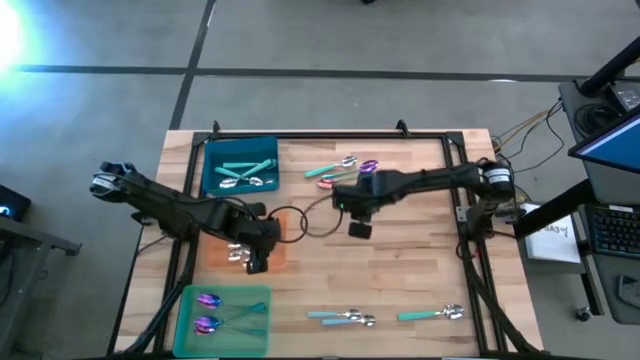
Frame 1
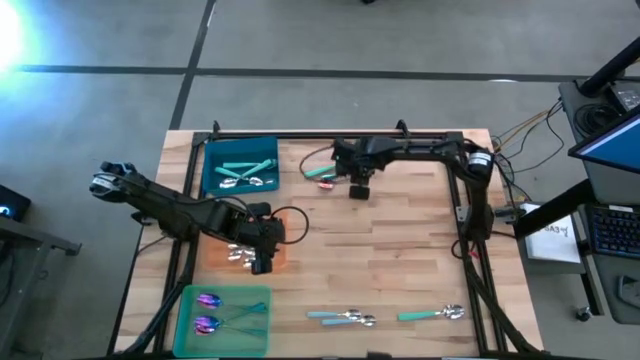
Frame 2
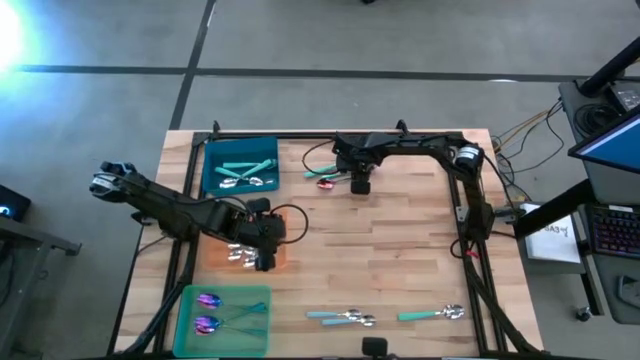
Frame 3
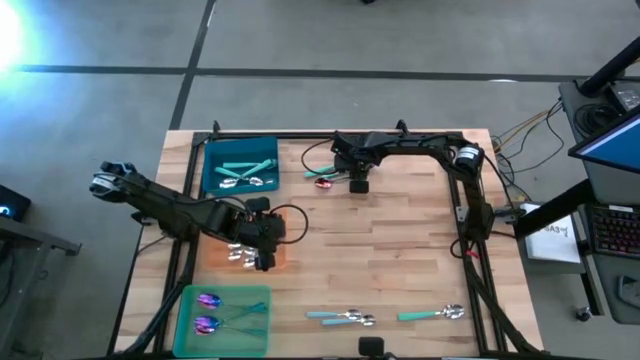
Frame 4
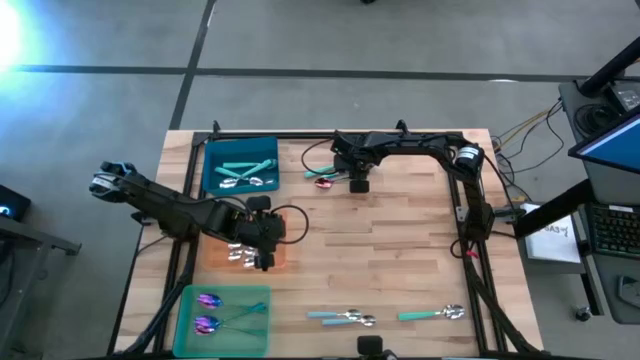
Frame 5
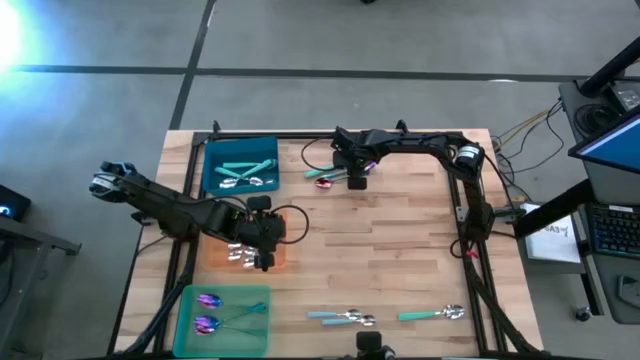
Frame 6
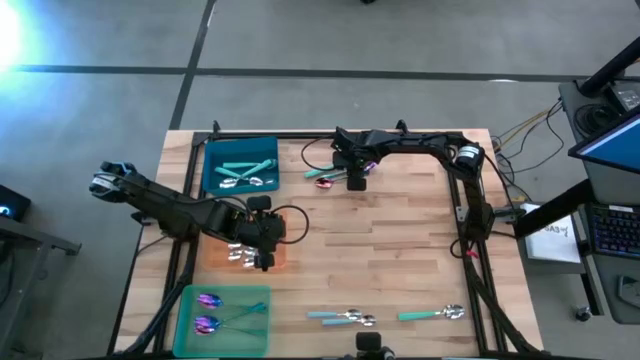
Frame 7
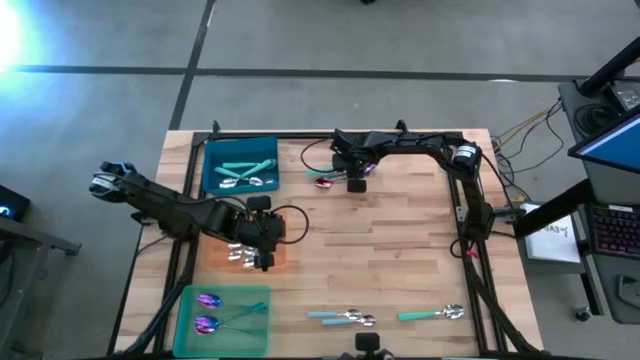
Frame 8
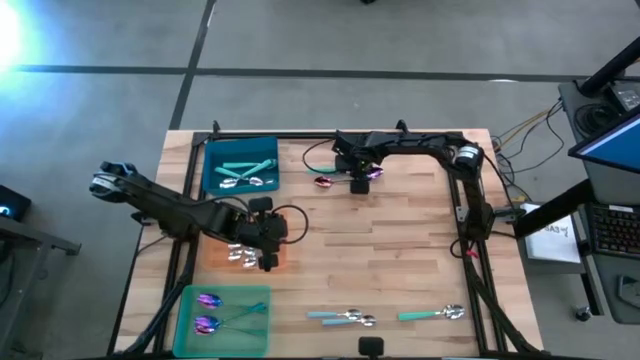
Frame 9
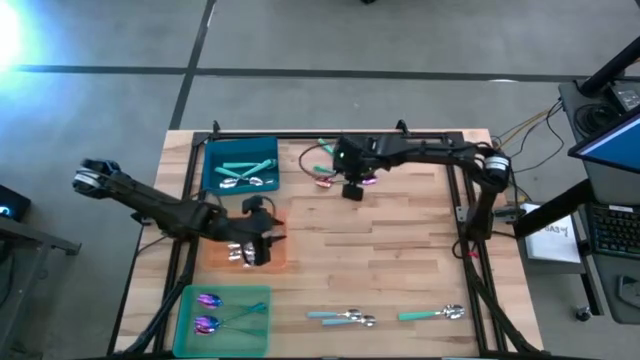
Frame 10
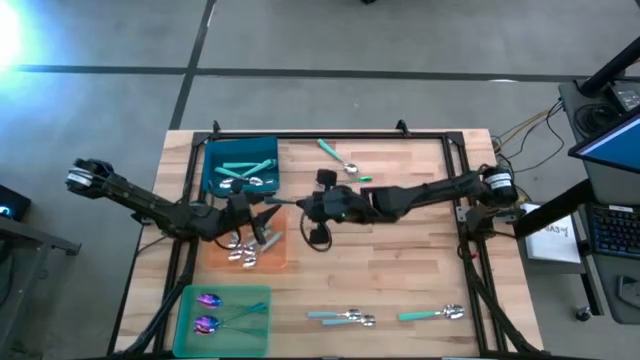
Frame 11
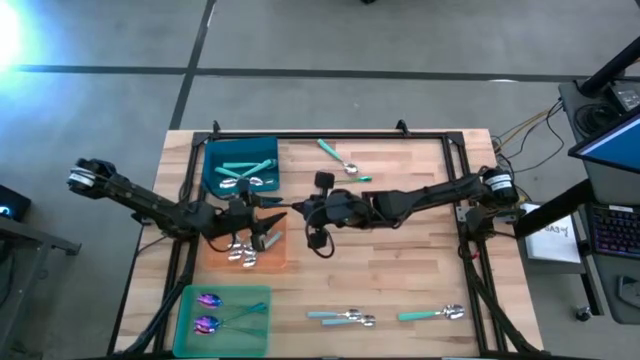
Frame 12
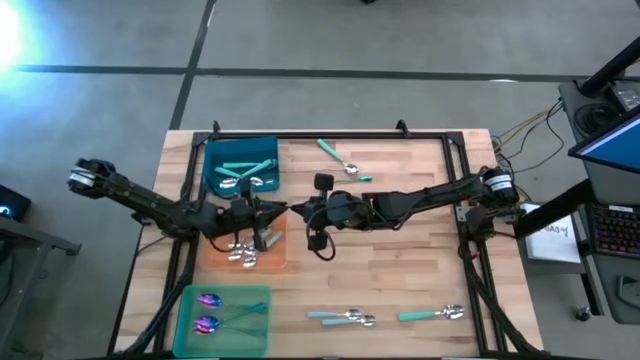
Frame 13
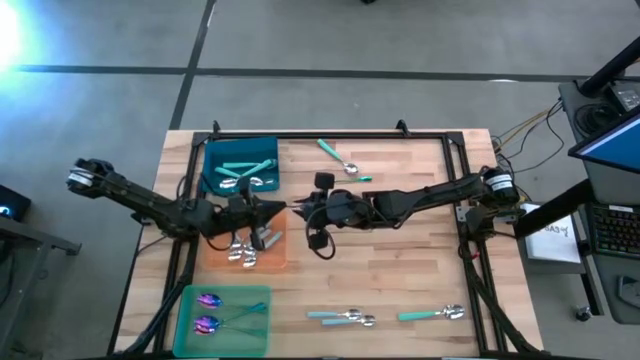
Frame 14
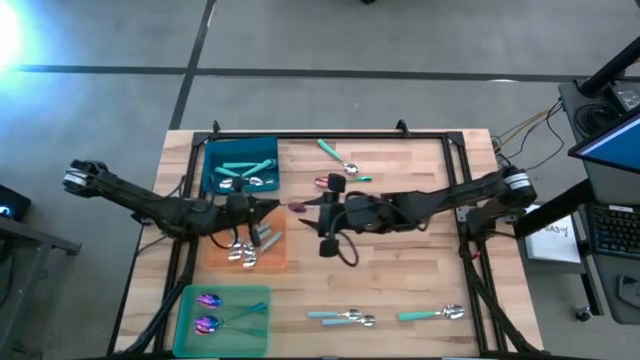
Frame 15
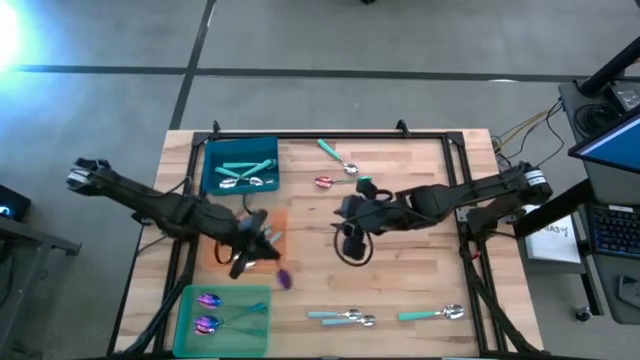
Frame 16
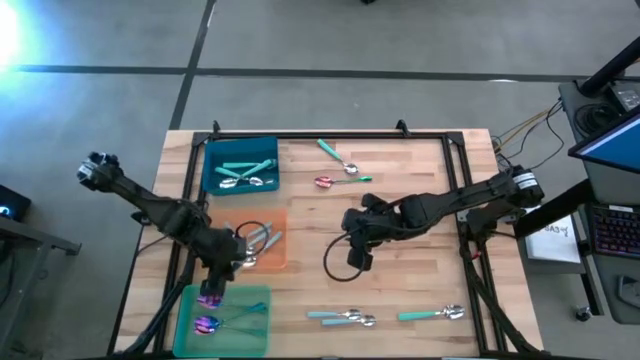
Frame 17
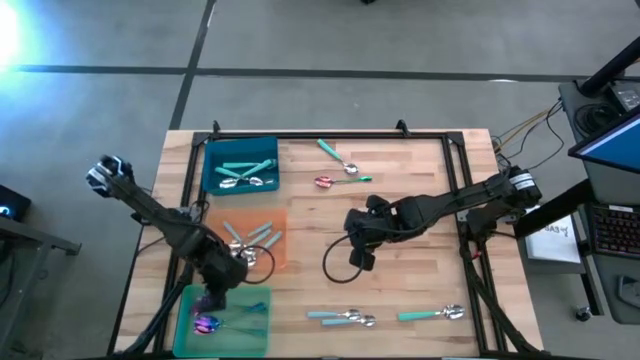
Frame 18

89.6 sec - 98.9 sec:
Task: Sort silverware by color (type)
Put the violet spoon into the green bin

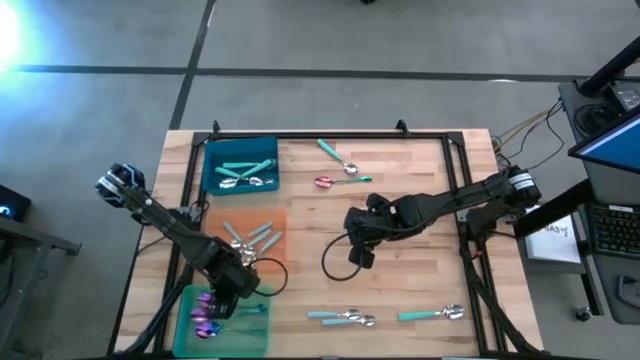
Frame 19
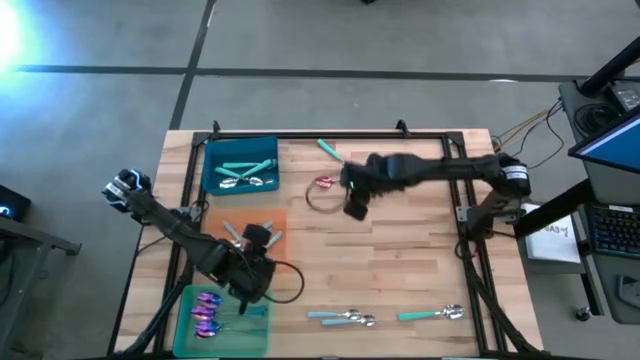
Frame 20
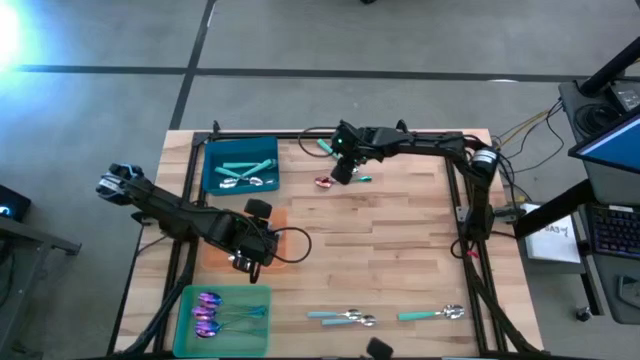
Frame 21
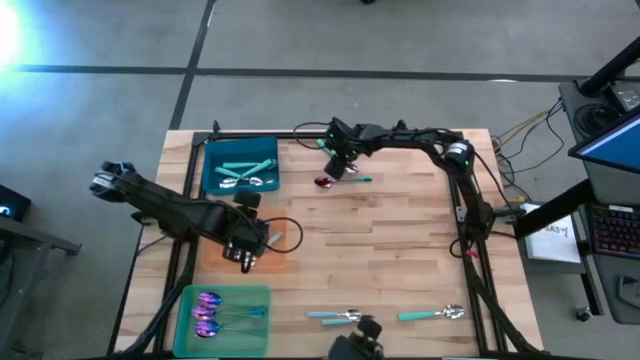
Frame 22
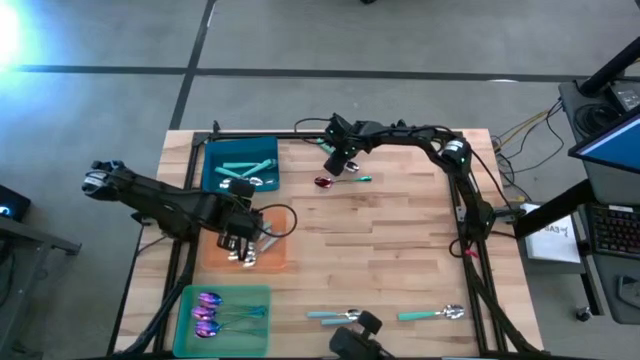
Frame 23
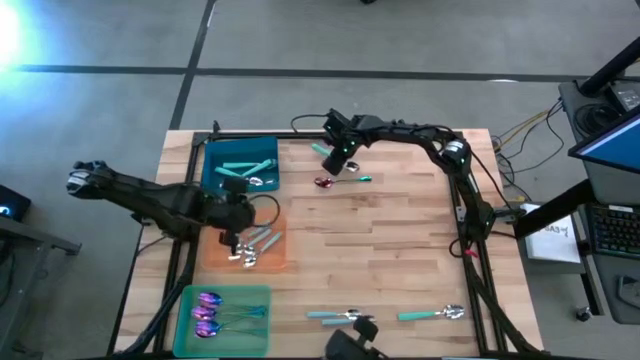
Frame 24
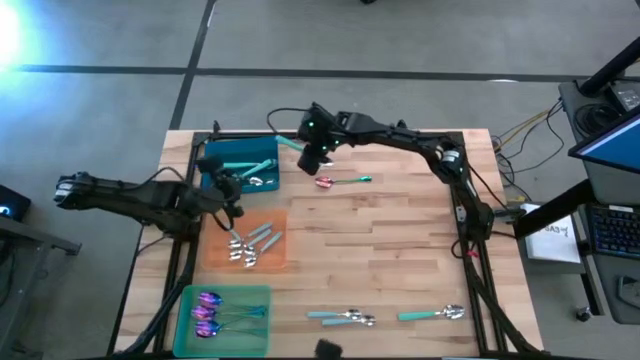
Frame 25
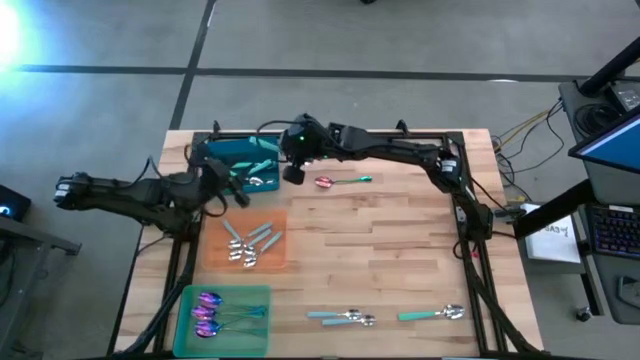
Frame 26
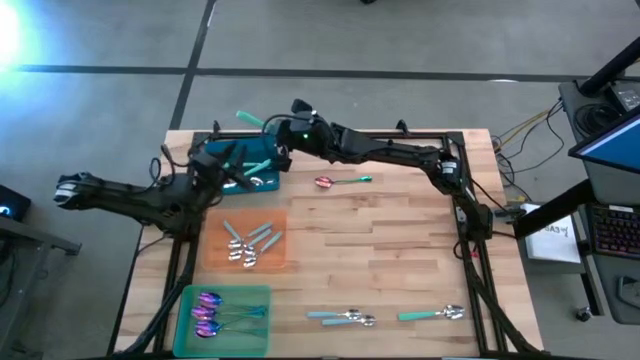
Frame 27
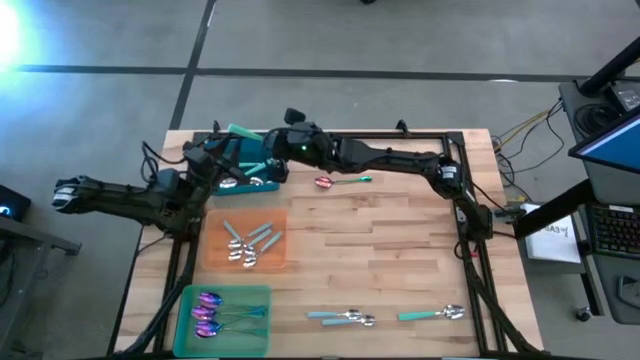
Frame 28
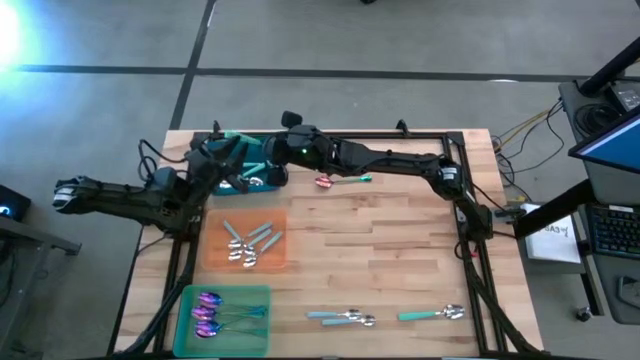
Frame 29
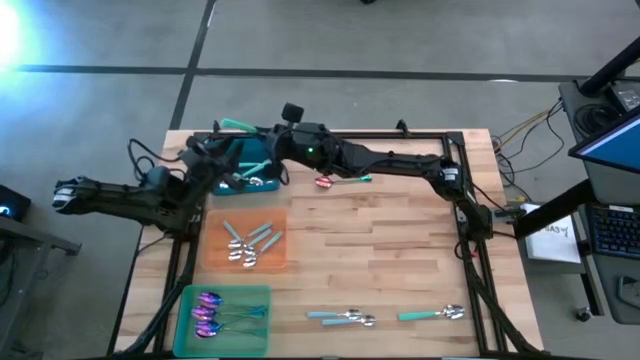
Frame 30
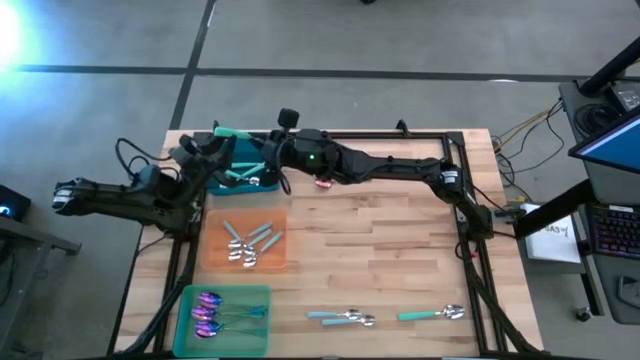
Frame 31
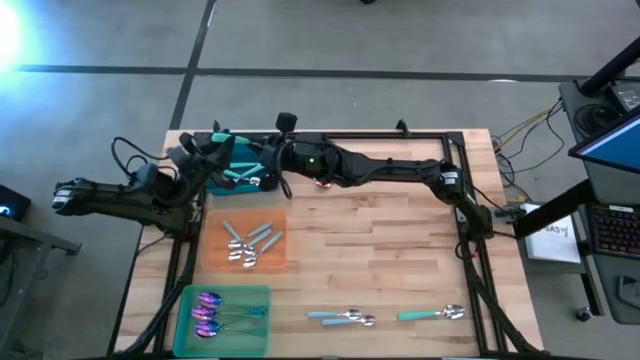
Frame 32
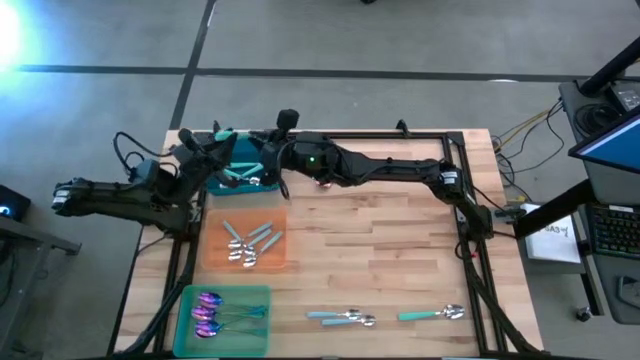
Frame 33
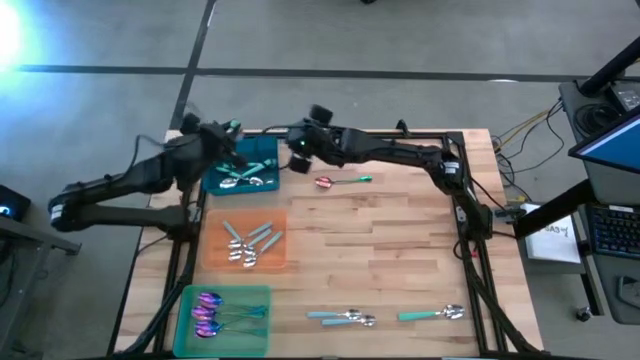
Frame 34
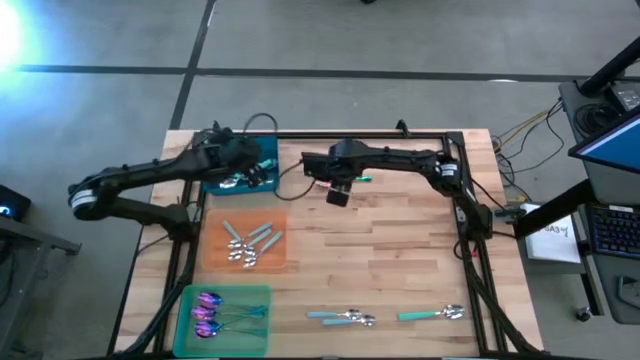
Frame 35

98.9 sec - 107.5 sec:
Put the green spoon into the blue bin

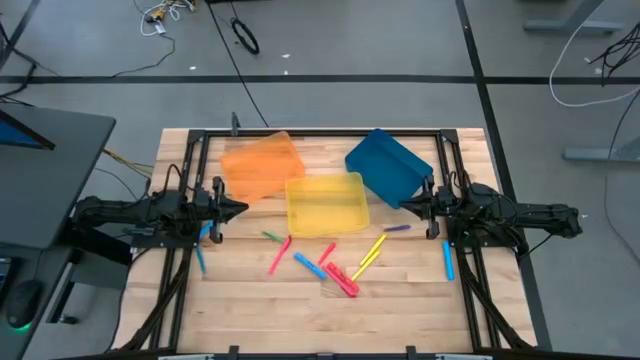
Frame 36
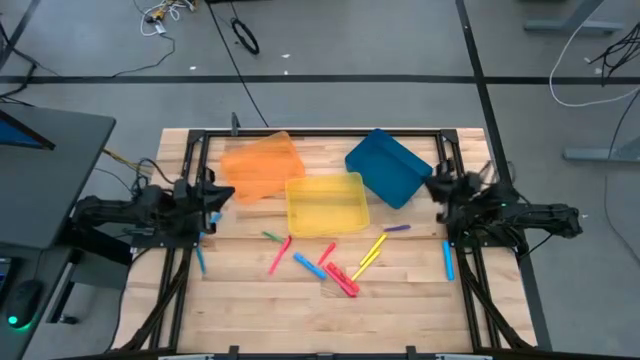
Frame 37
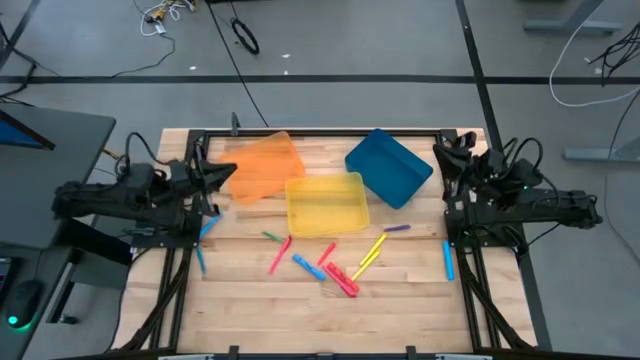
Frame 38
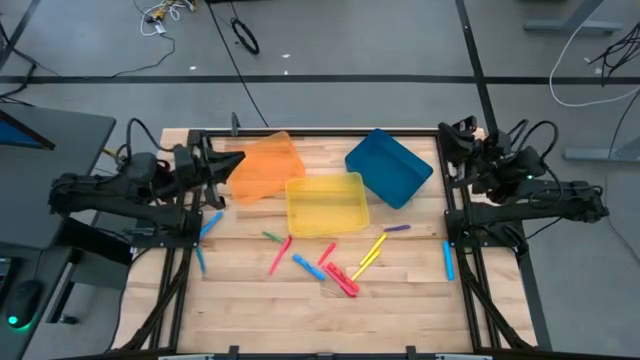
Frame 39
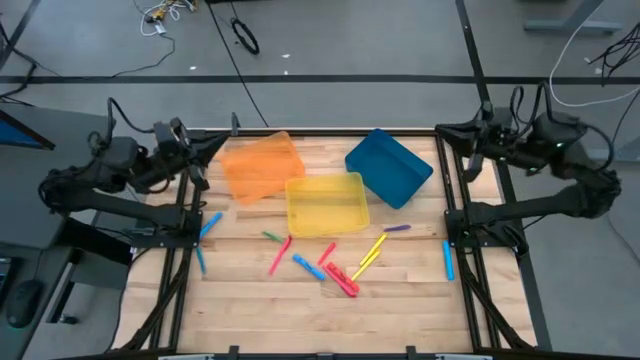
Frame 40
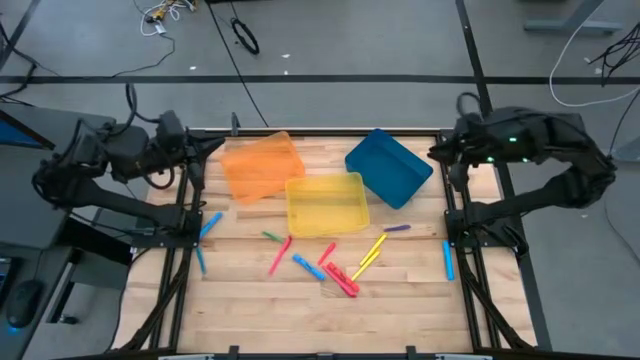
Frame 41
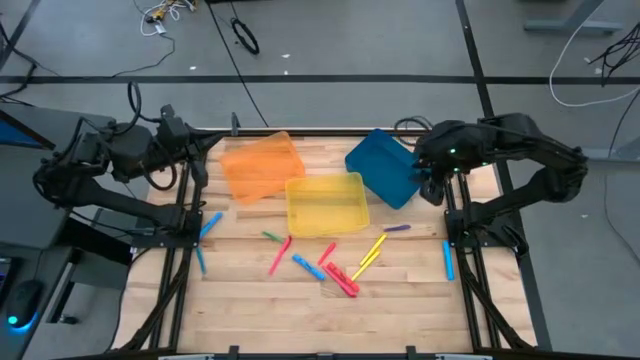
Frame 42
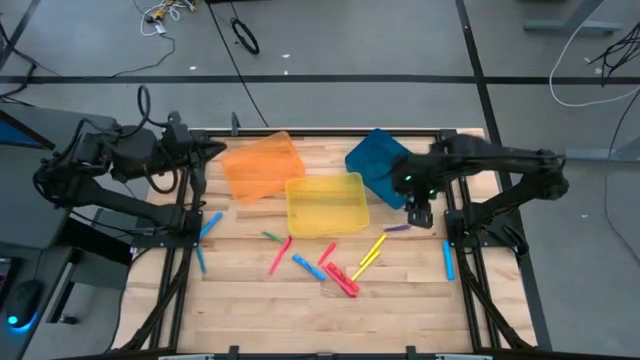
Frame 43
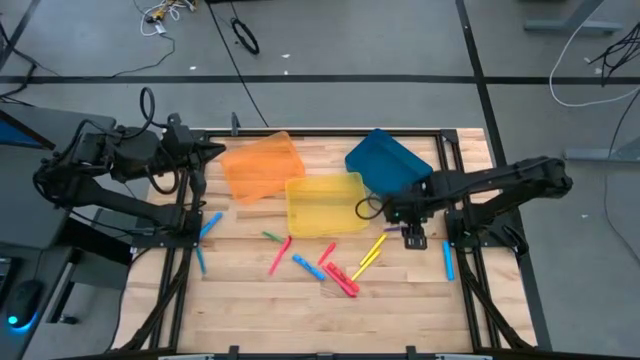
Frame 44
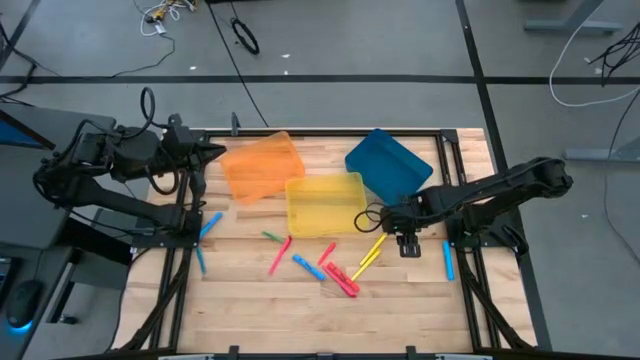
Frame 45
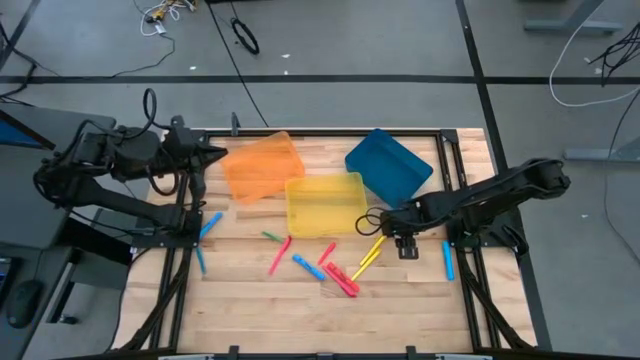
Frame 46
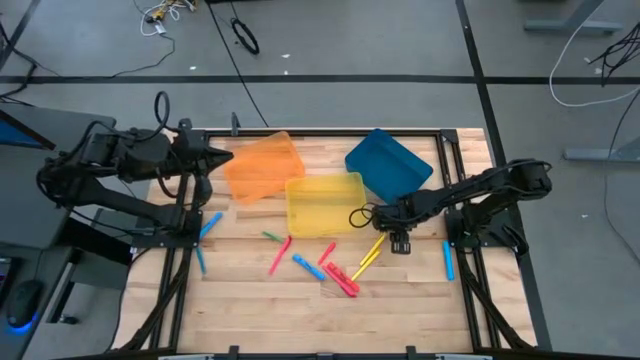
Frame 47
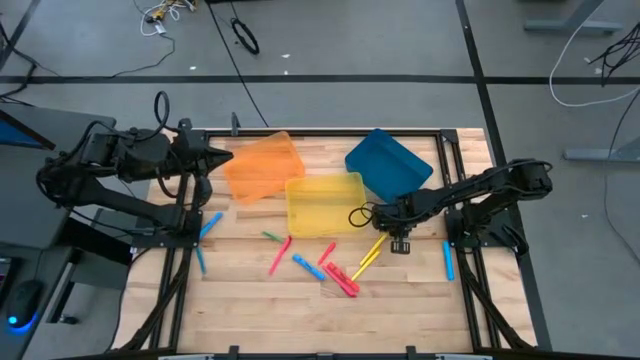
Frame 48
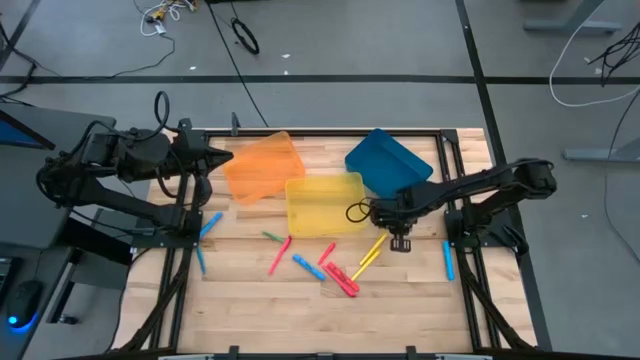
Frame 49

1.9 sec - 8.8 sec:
Task: Pick & Place Markers
Put the purple pen into the blue bin
